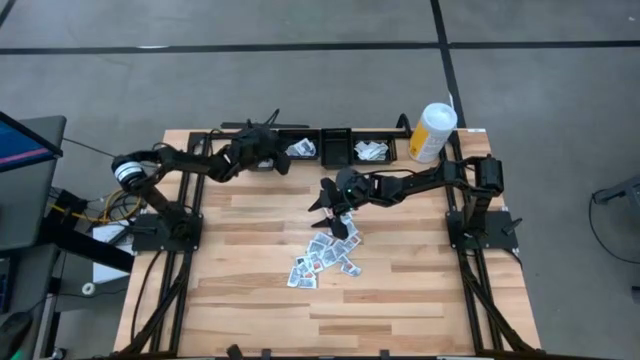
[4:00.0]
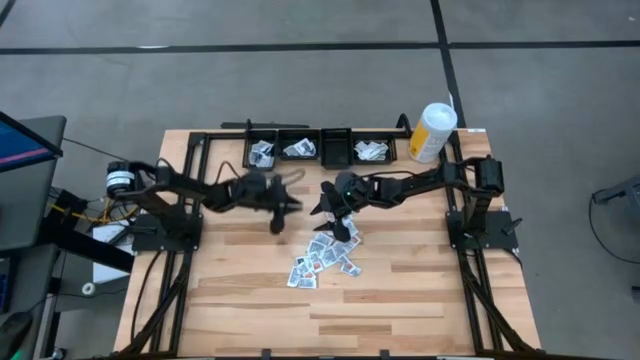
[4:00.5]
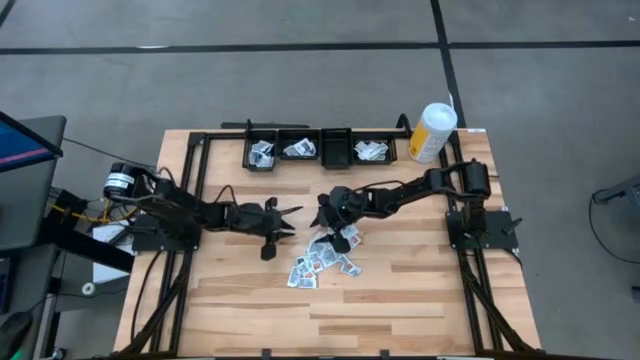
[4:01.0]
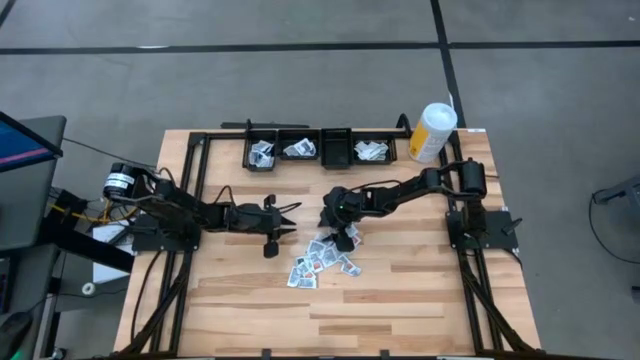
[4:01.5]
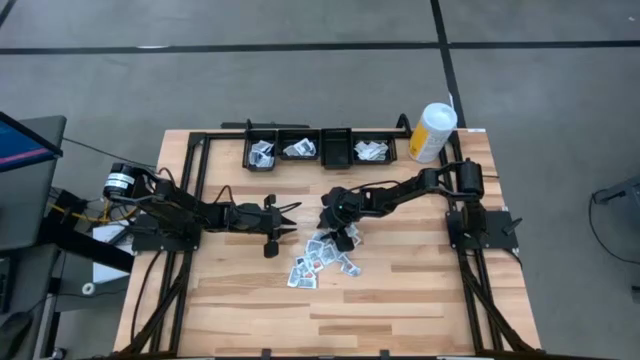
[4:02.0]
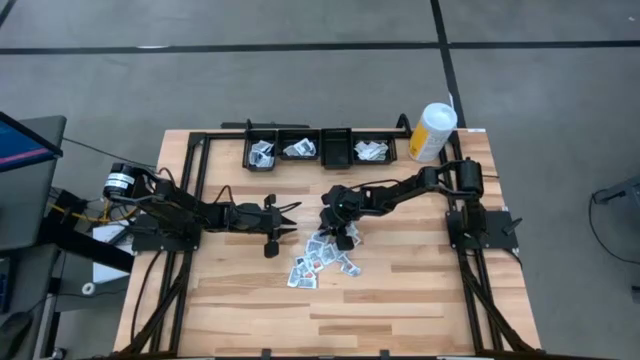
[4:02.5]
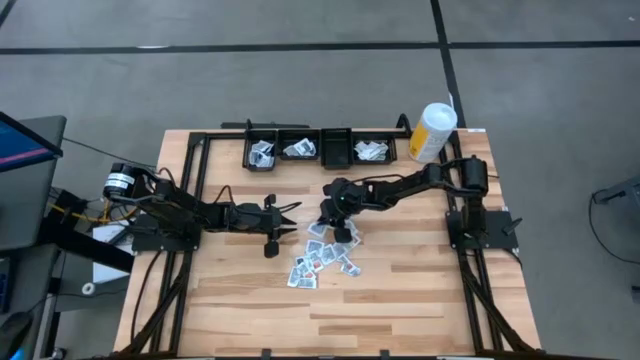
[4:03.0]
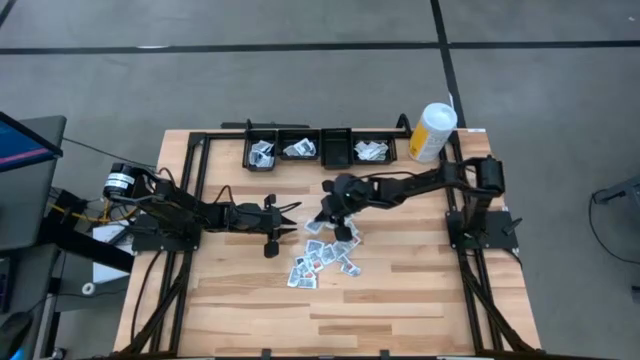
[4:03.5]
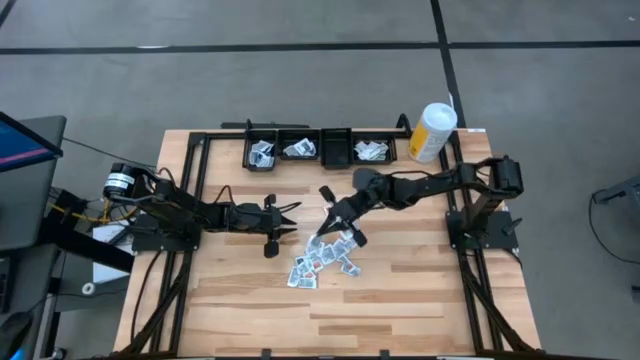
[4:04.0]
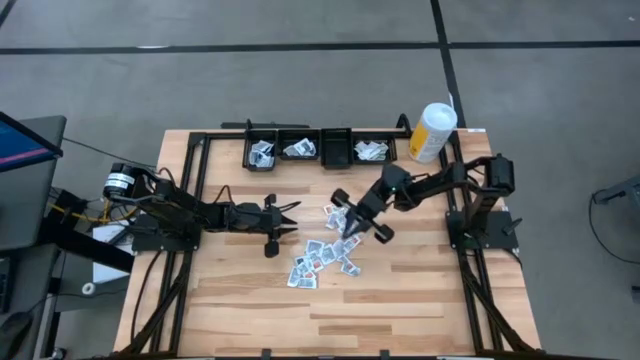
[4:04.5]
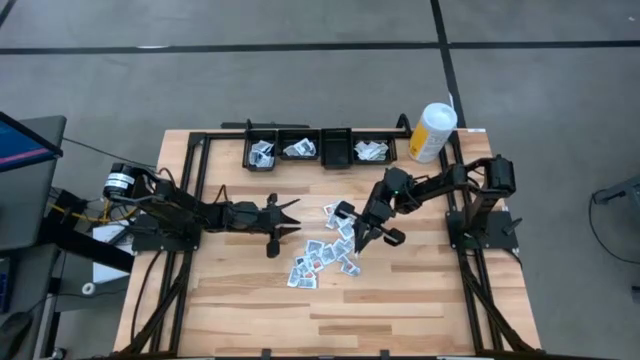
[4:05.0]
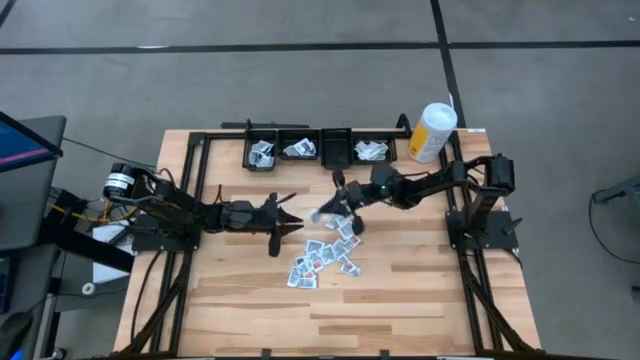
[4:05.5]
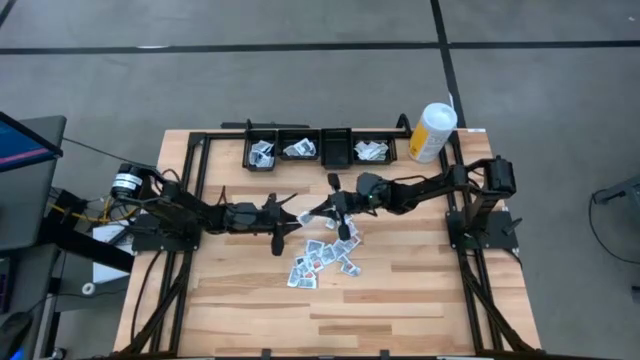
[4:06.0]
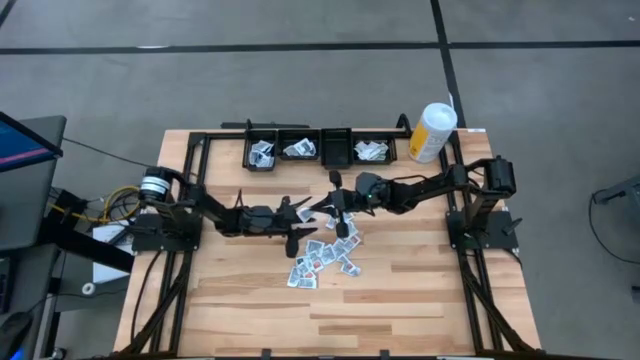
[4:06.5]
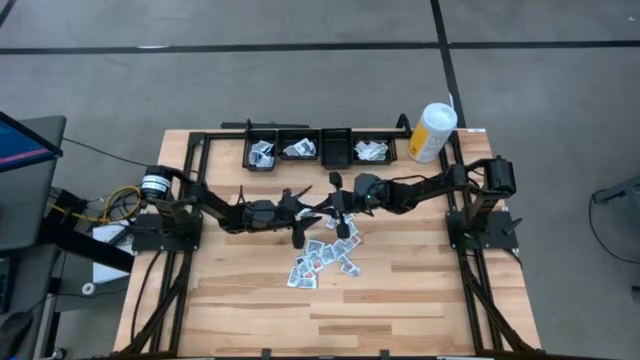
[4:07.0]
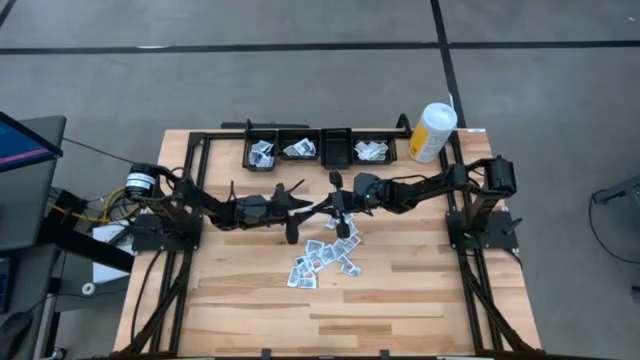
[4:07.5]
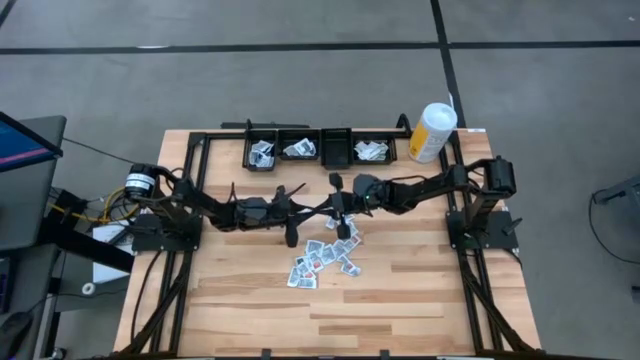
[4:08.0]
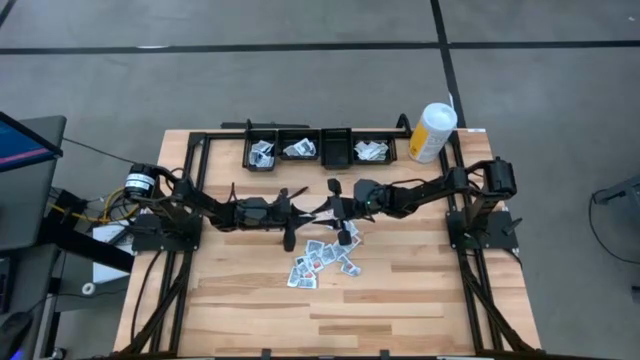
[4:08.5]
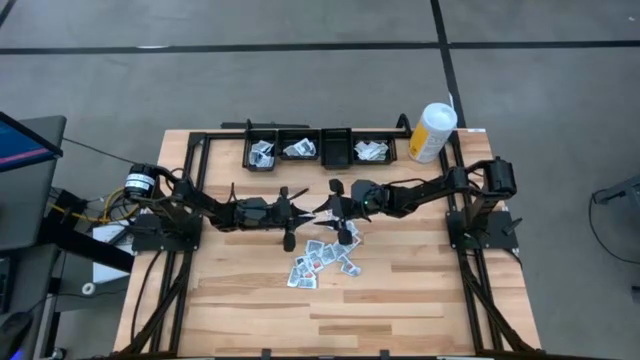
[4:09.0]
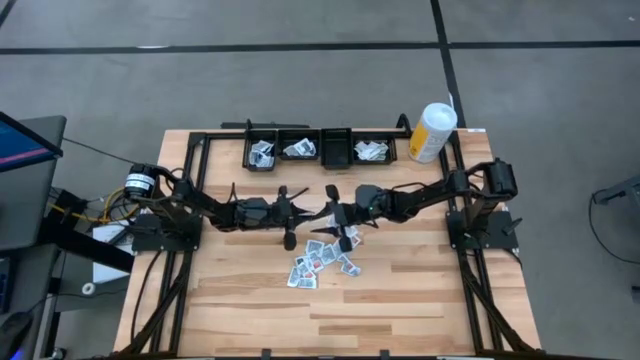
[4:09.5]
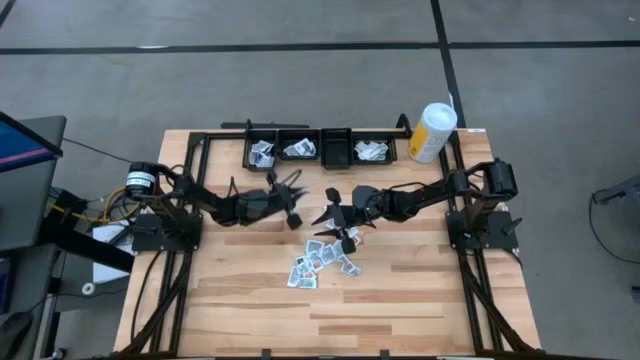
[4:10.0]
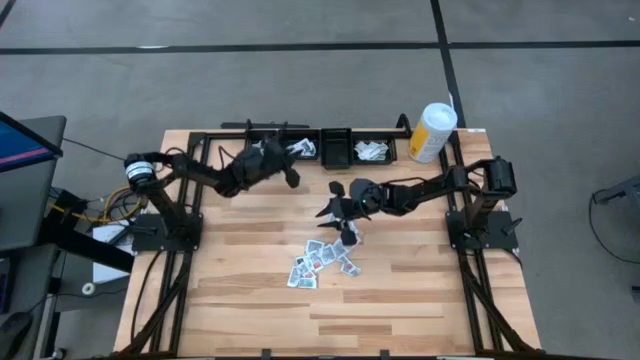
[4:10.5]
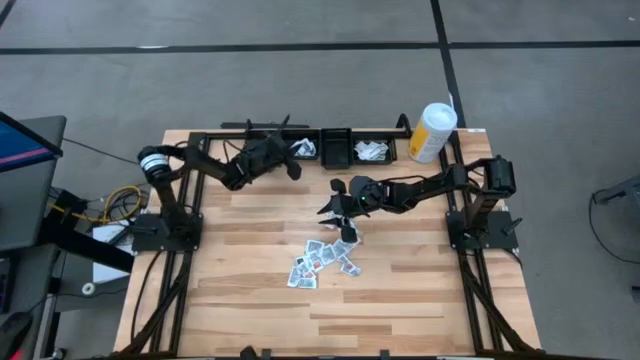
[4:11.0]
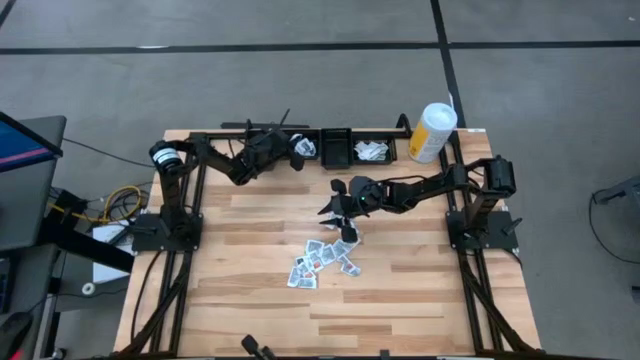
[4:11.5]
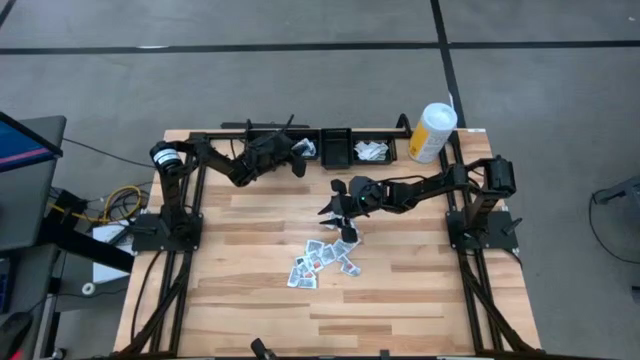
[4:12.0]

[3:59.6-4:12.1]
Task: Pick & Place First Aid Supplies
Put the black towelette pack into the middle left black bin

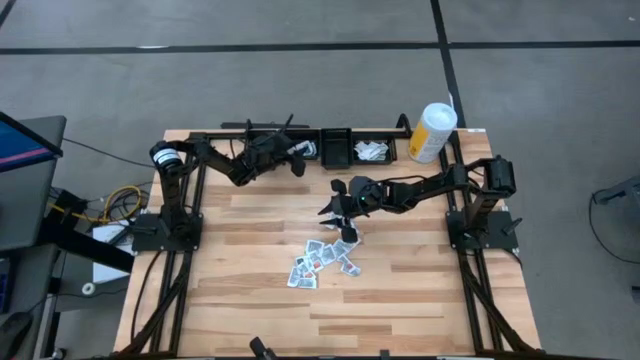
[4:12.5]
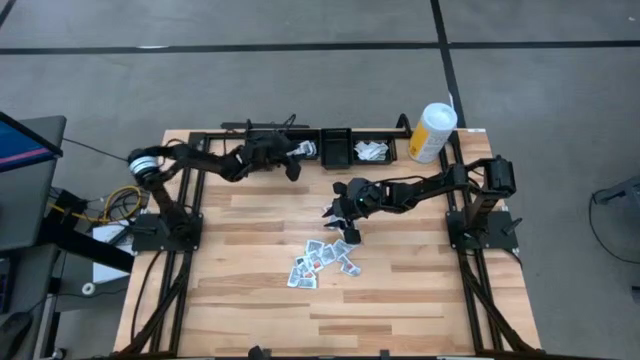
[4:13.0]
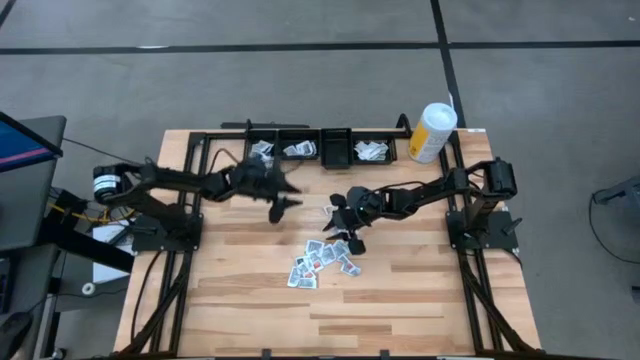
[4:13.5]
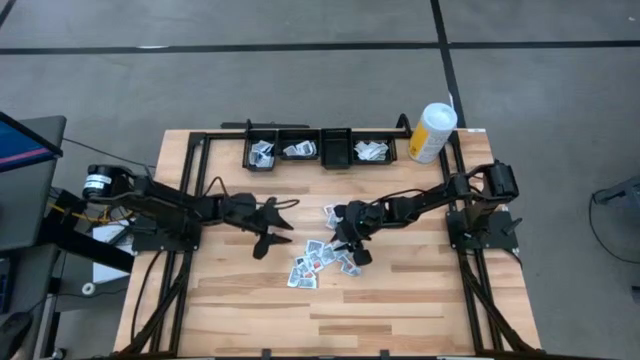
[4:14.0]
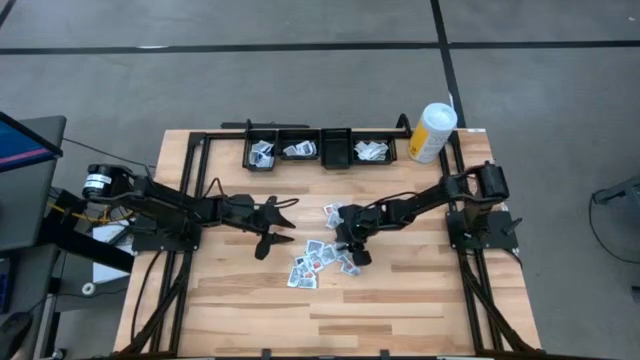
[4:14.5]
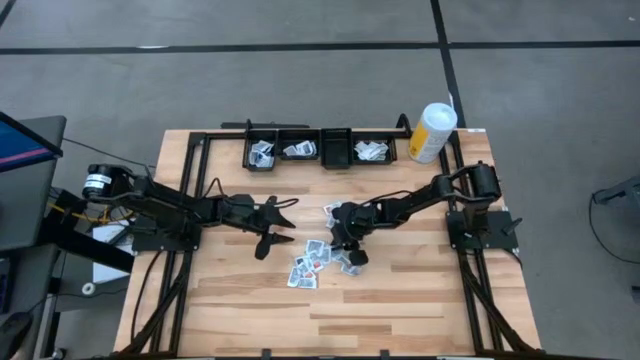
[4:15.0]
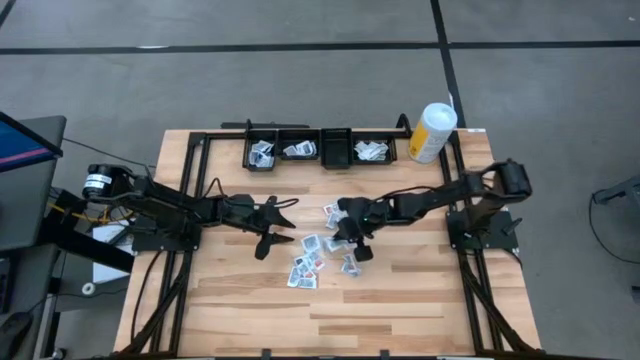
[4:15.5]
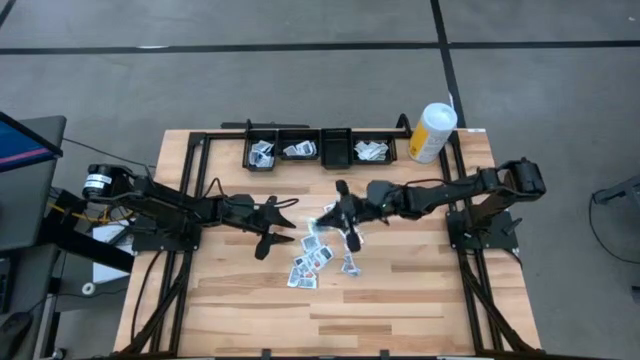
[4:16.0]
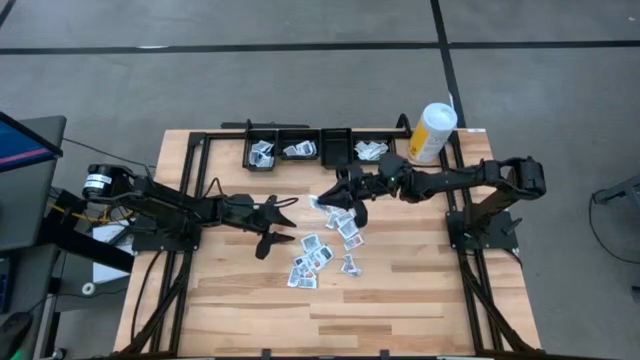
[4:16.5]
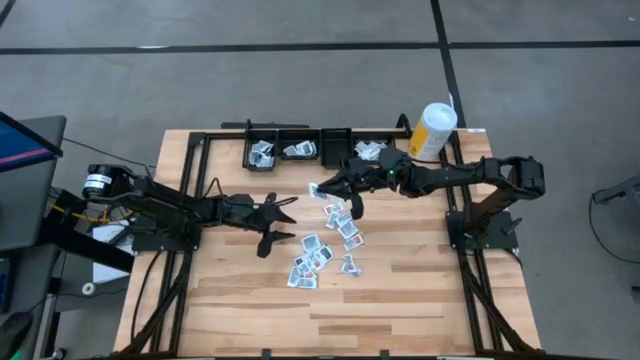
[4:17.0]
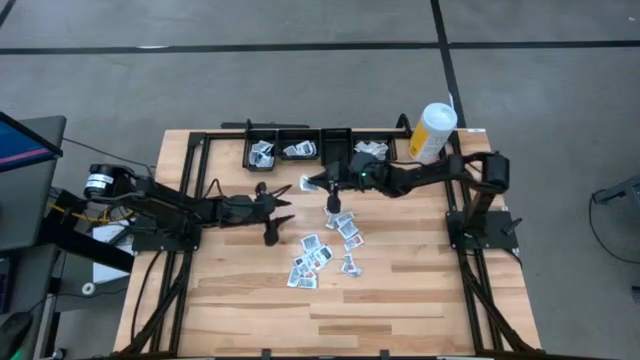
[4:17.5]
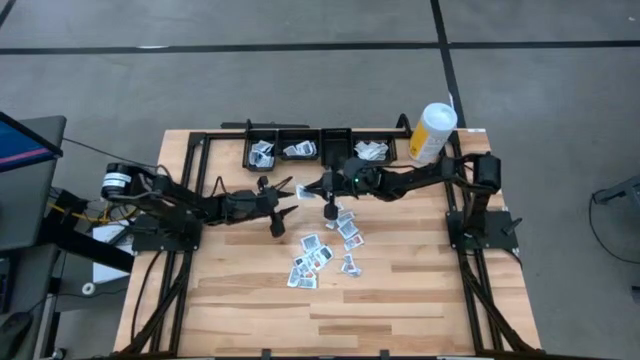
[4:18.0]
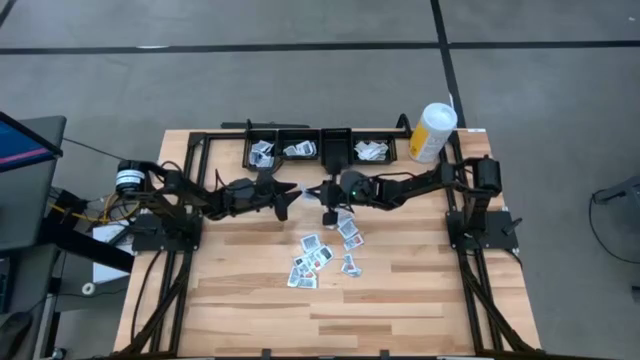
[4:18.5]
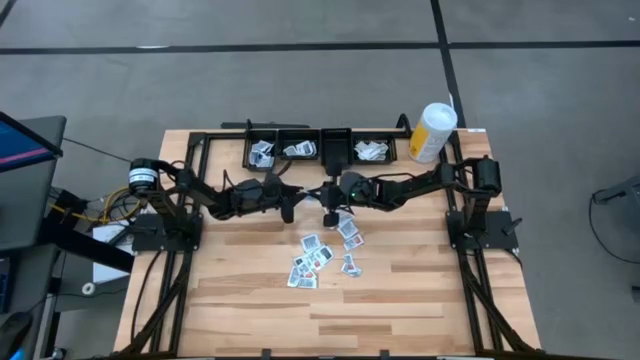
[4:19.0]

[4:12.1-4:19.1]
Put the black towelette pack into the middle left black bin

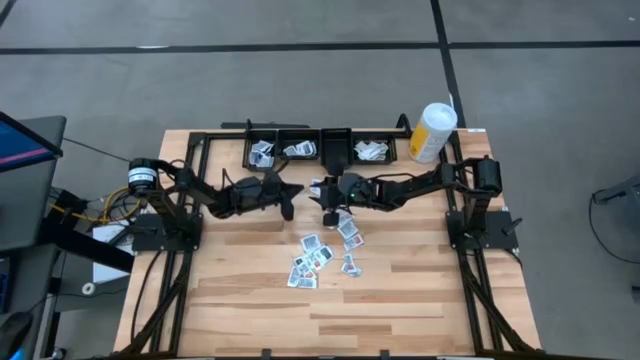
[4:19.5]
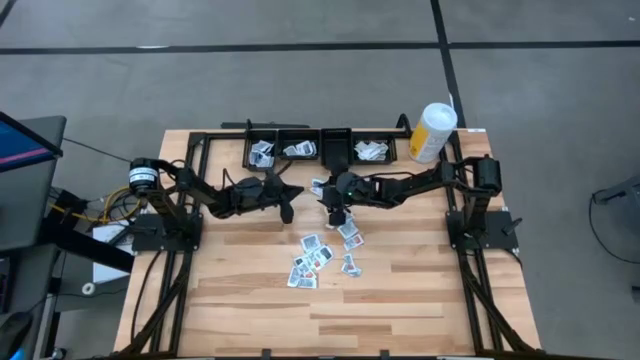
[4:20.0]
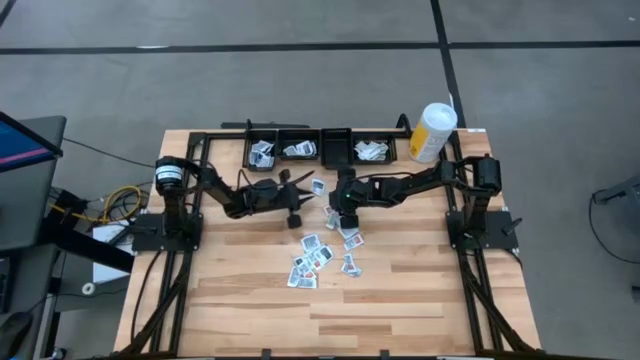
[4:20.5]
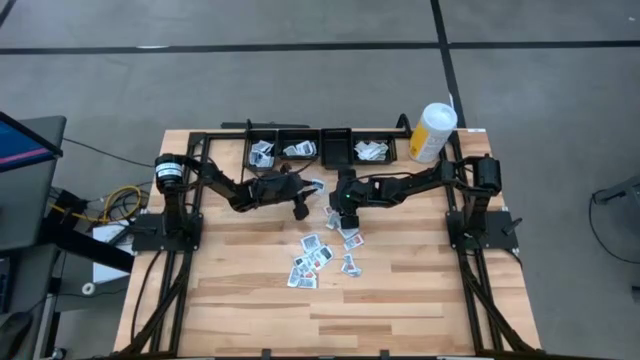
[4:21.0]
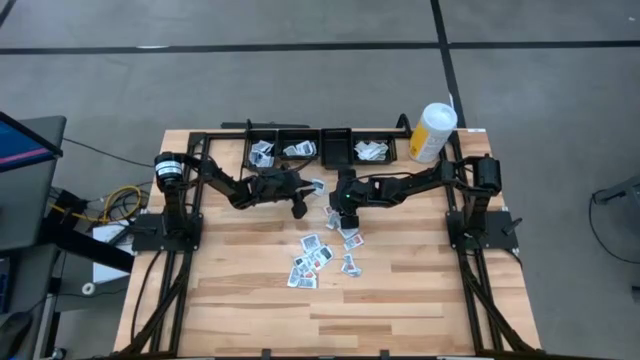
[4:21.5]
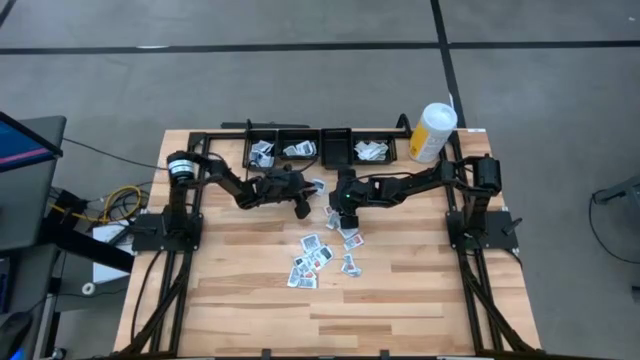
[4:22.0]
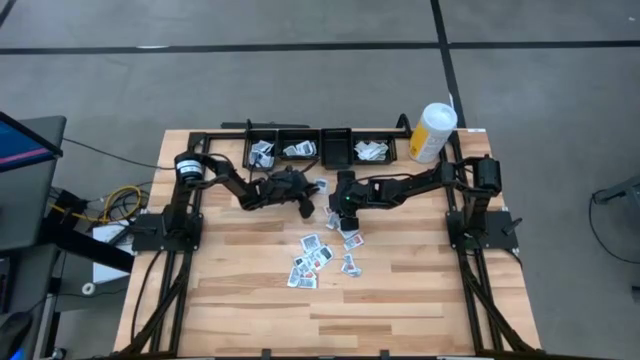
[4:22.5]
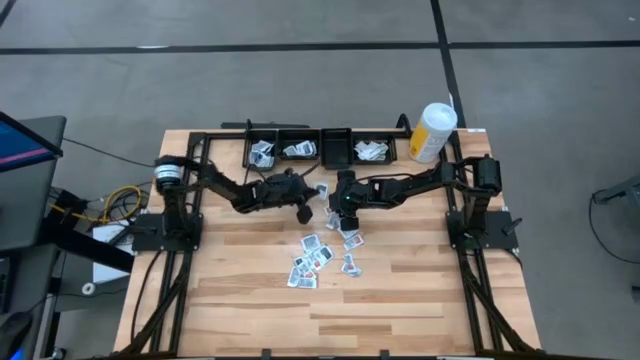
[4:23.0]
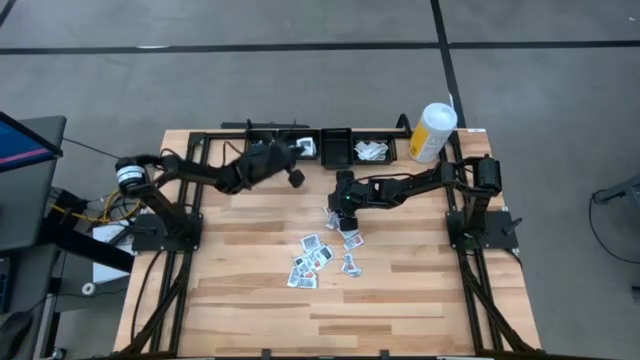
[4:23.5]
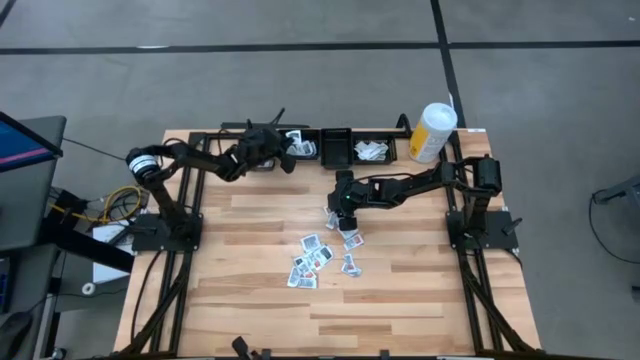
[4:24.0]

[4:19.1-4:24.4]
Put the black towelette pack into the middle left black bin
